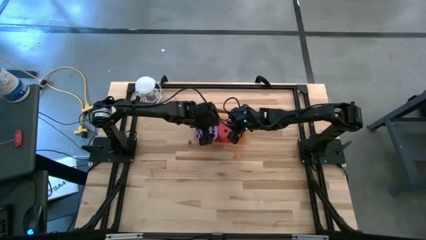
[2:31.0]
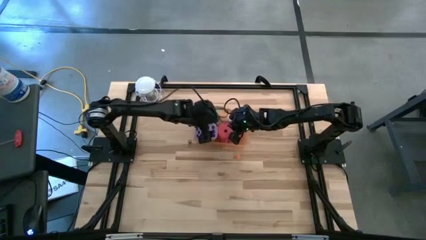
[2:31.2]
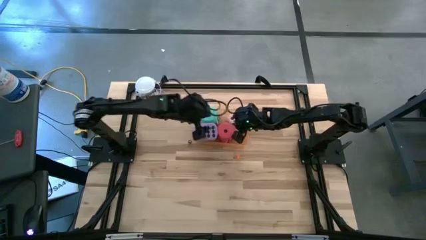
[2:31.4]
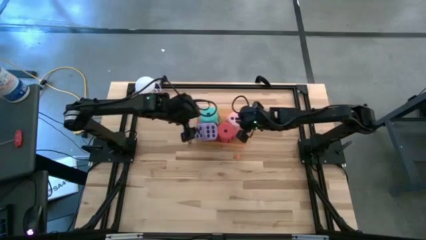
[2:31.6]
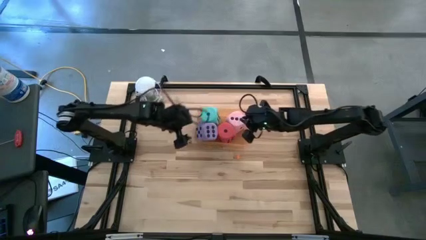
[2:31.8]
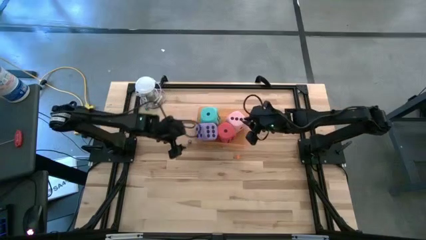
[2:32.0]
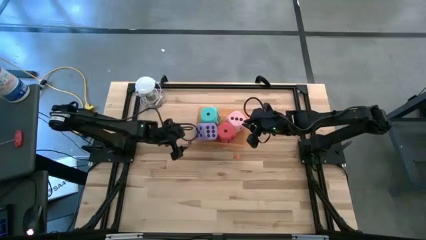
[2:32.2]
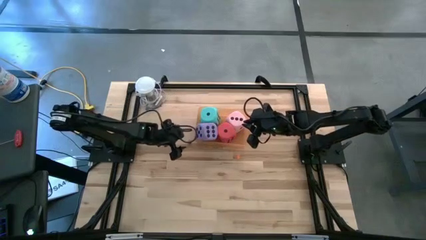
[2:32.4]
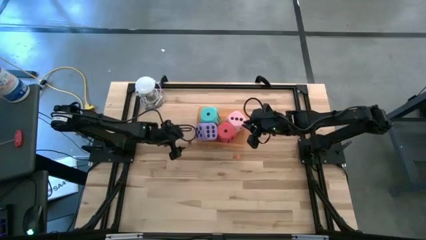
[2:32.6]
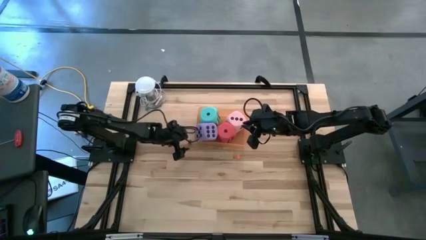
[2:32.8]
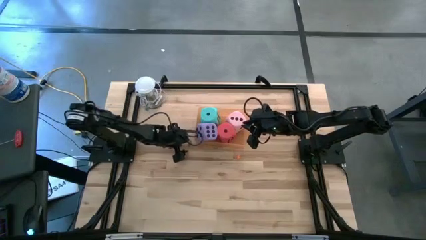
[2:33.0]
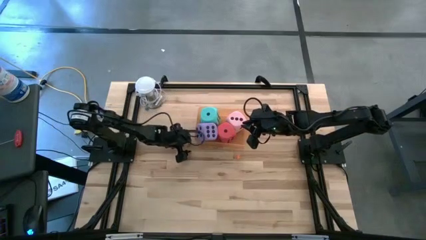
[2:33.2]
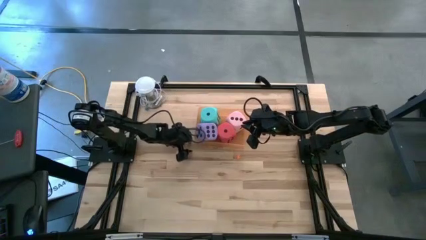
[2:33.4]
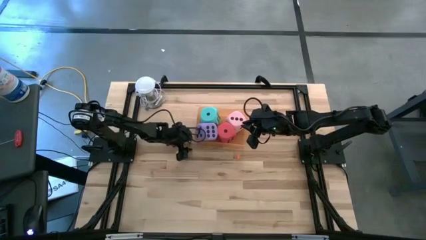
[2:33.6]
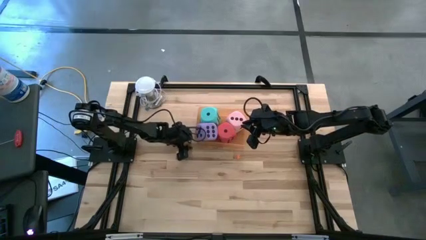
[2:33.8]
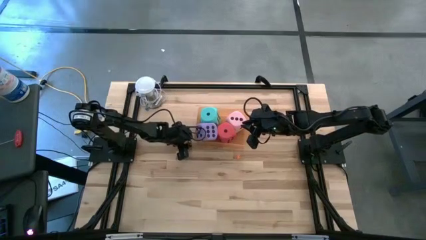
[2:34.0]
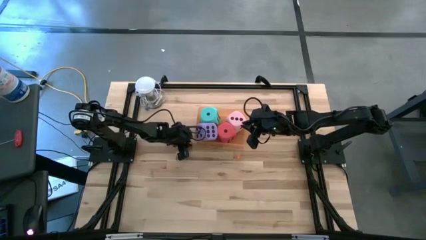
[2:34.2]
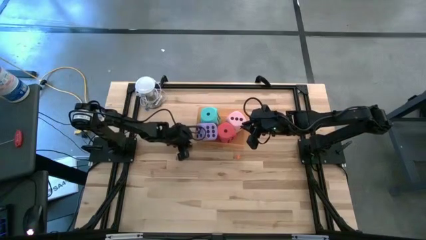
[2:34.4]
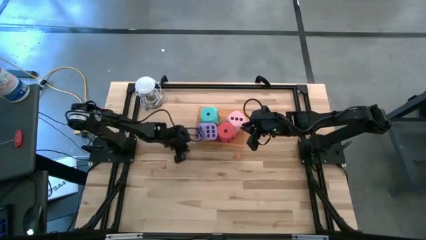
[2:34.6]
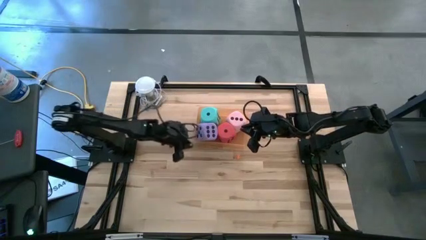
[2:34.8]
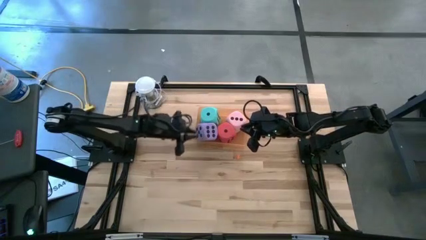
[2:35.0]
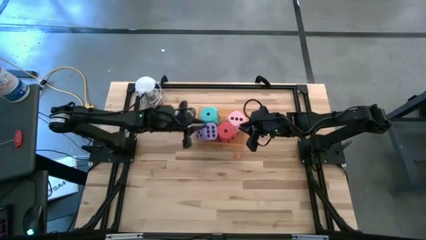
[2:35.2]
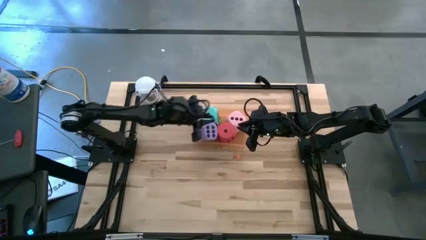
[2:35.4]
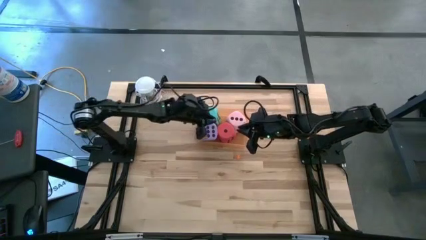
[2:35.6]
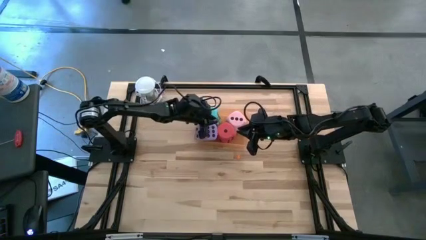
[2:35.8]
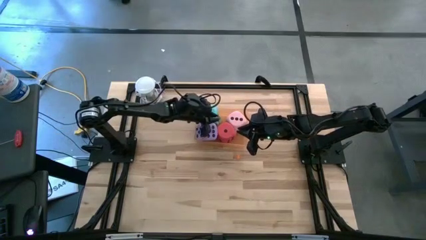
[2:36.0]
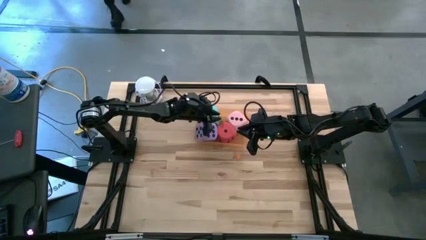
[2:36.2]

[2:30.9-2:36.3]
Task: Pick & Place Dice
Put the small black dice into the orange bin

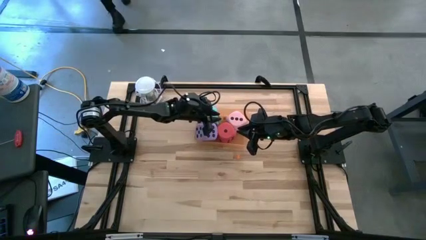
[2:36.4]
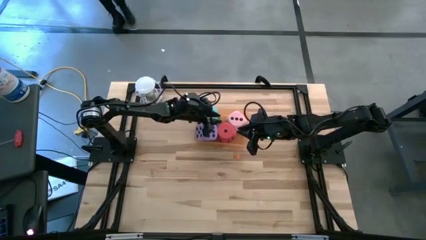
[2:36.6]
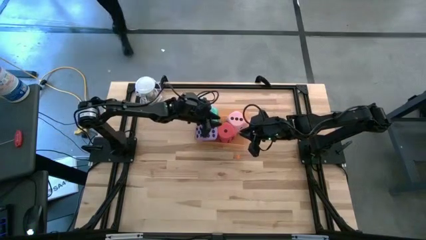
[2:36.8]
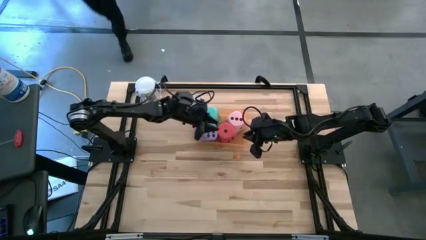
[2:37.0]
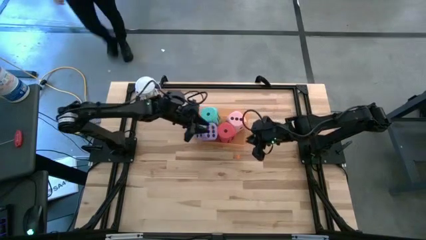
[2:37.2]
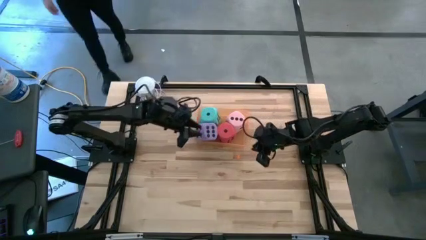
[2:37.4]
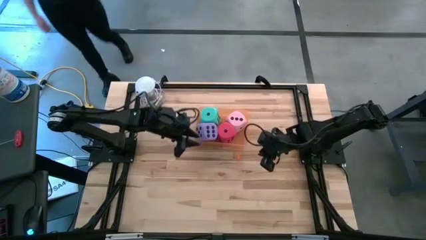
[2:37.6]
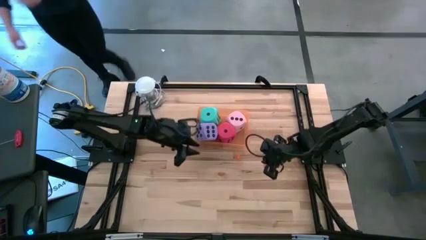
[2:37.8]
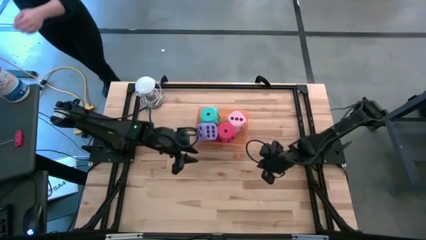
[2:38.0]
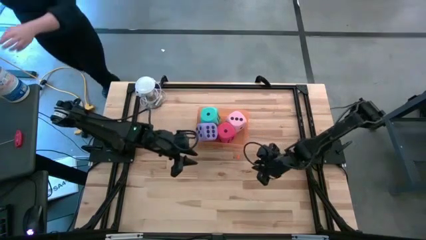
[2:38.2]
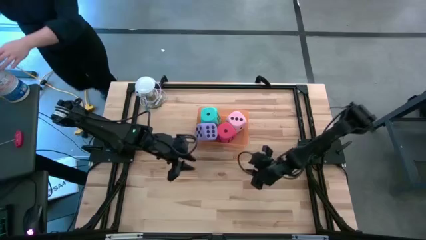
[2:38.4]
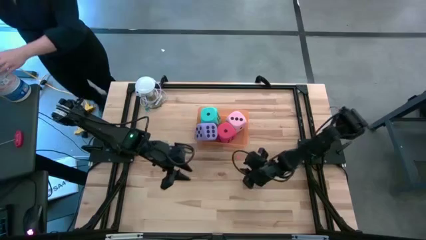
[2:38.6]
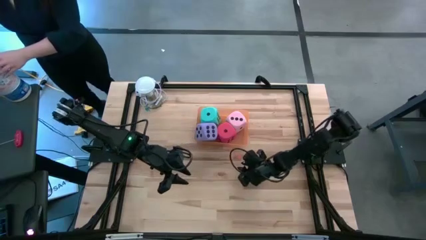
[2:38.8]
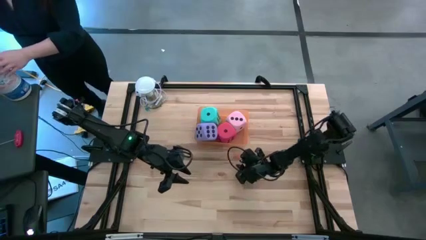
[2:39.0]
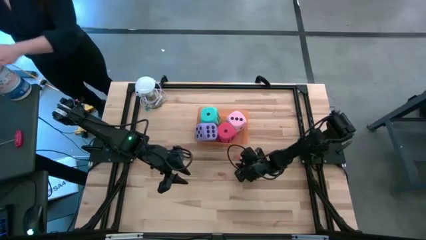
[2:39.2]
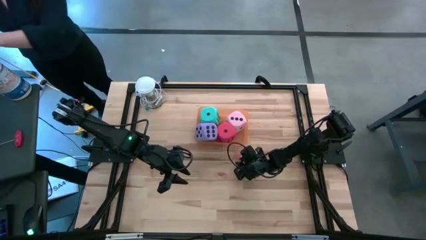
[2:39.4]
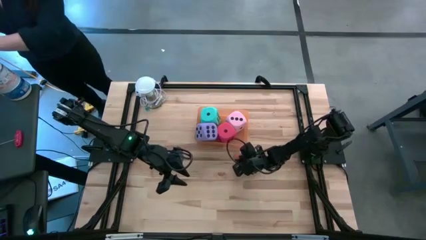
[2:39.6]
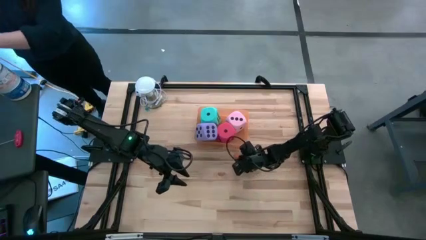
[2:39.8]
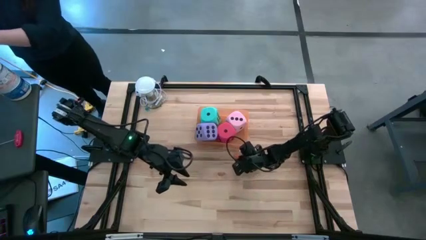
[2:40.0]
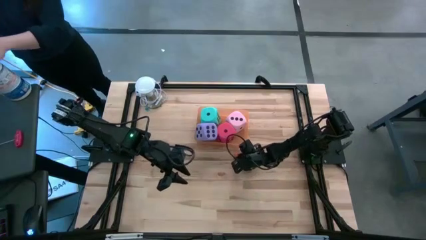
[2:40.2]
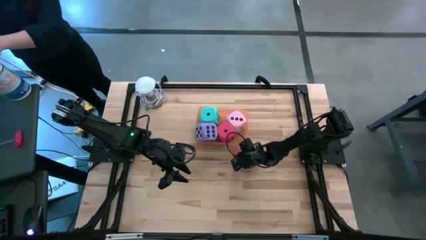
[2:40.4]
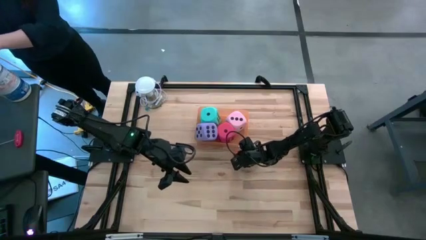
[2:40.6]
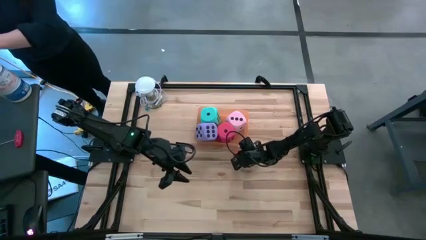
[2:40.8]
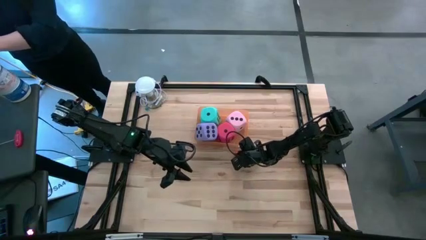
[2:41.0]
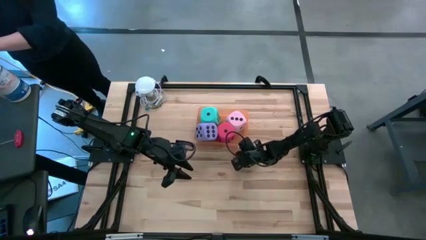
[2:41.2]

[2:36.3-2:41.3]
Put the small orange dice into the orange bin

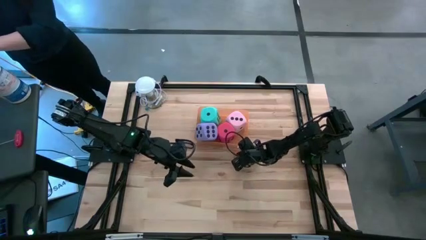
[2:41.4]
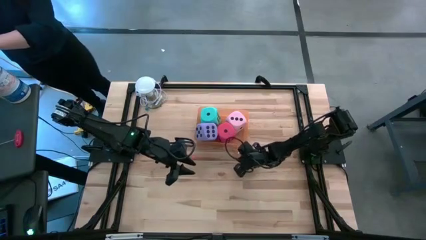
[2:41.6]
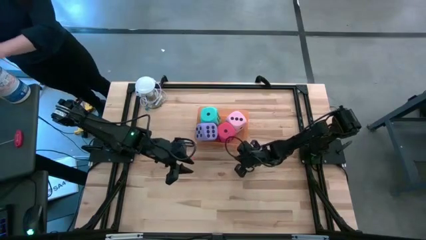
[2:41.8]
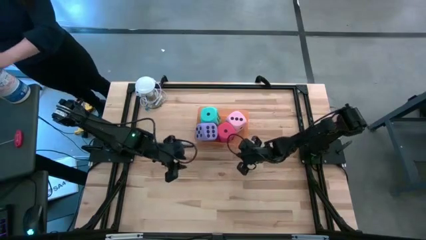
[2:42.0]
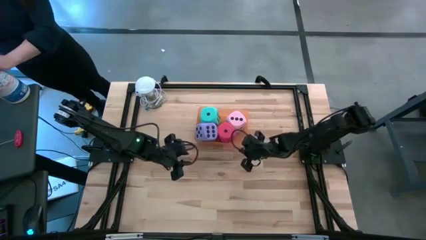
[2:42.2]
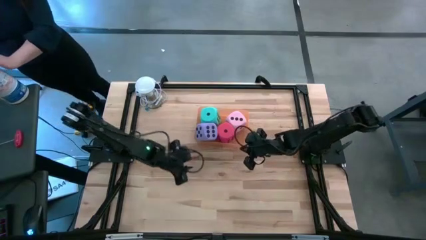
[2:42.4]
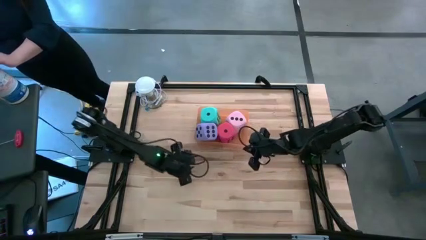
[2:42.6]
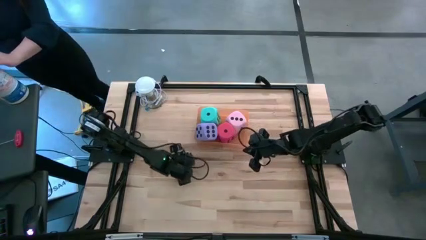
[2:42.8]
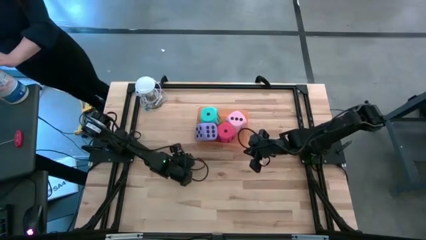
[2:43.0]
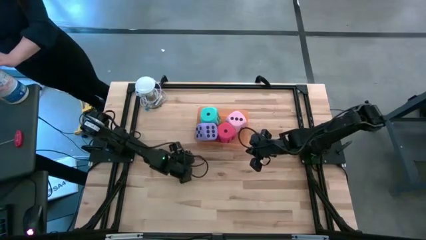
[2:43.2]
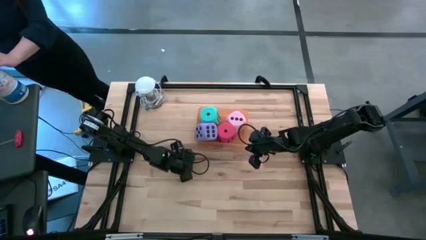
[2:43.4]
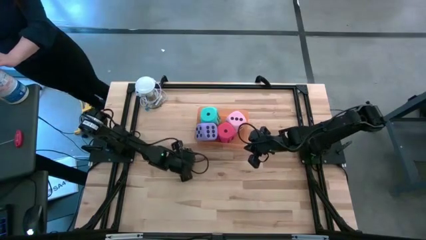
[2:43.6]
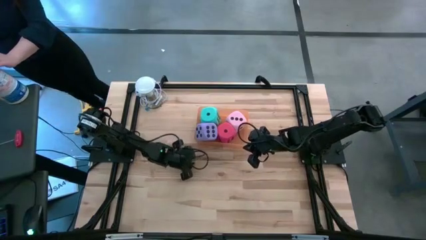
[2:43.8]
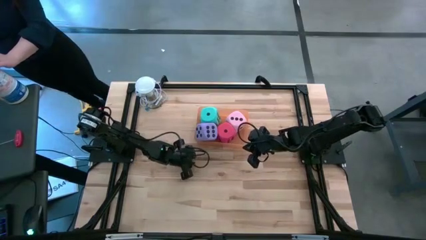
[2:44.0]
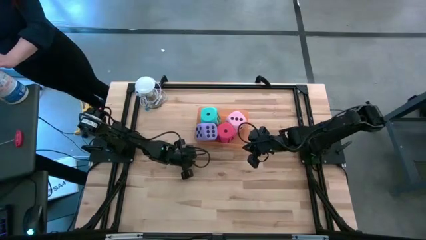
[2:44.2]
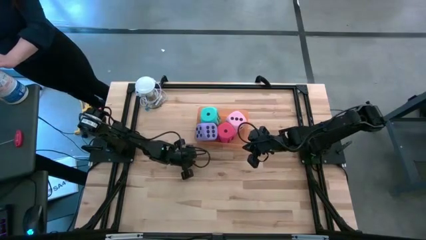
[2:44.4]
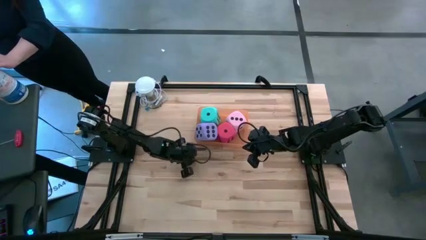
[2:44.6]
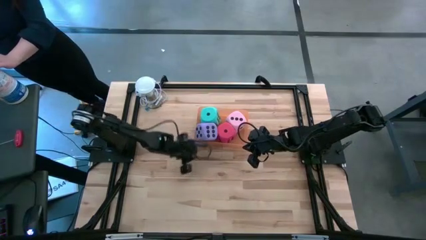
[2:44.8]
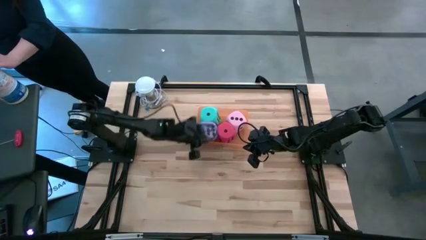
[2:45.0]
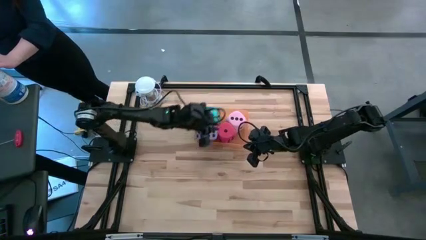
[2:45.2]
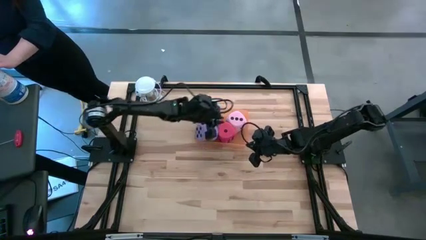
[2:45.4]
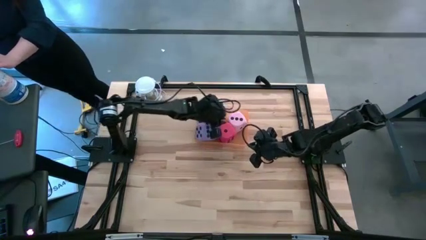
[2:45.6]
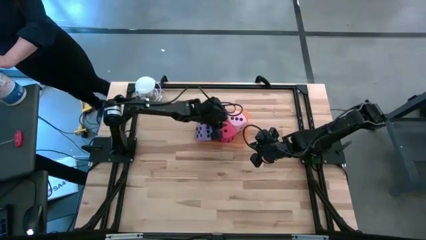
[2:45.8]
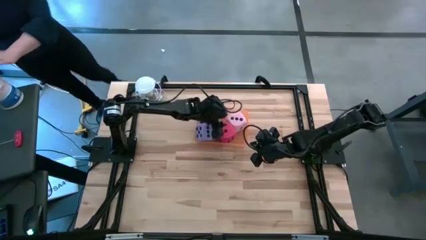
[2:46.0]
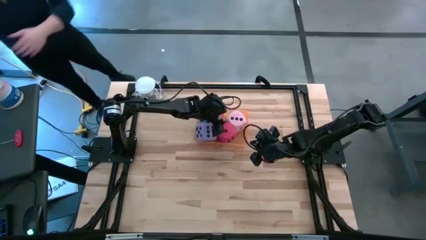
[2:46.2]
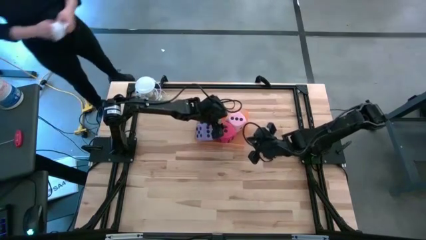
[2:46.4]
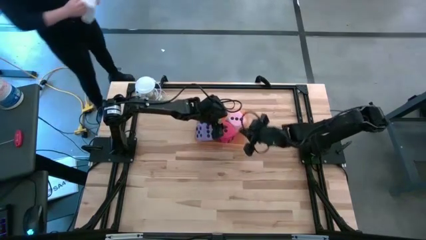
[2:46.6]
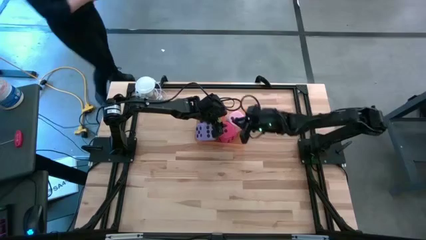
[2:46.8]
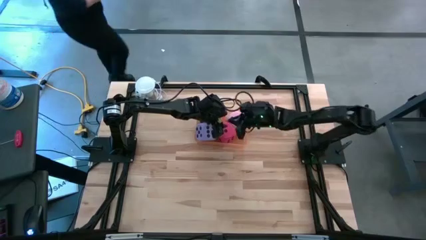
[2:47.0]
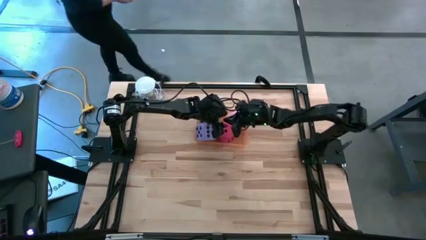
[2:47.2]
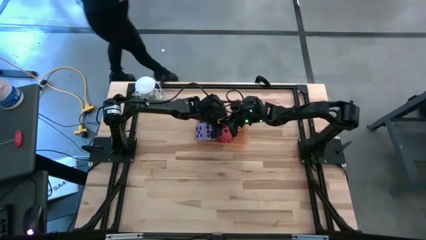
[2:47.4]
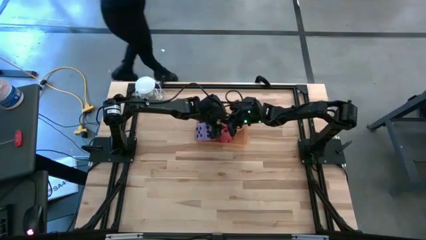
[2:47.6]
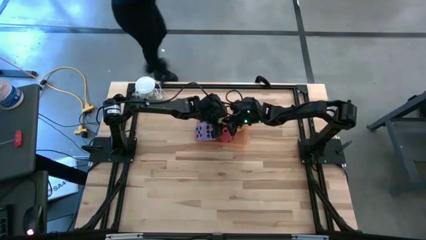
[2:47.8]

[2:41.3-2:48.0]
Put the small orange dice into the orange bin
